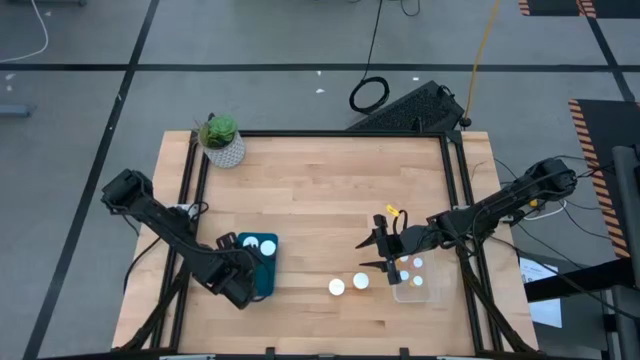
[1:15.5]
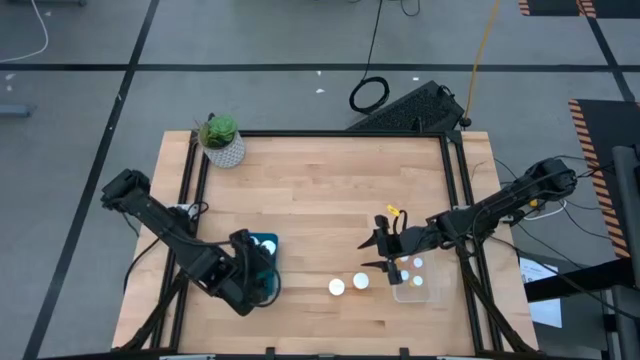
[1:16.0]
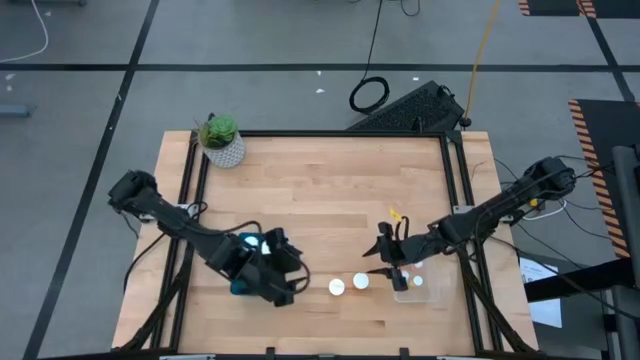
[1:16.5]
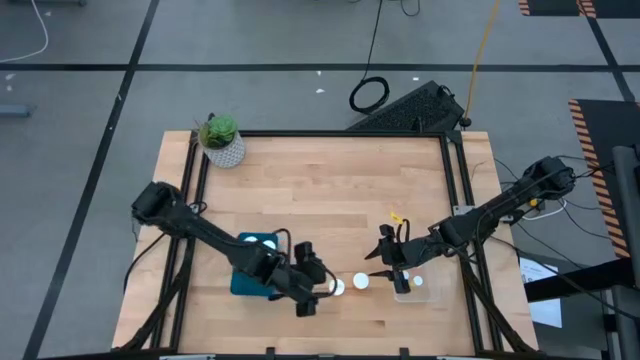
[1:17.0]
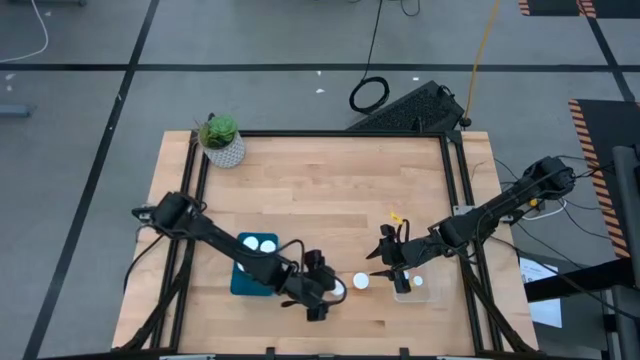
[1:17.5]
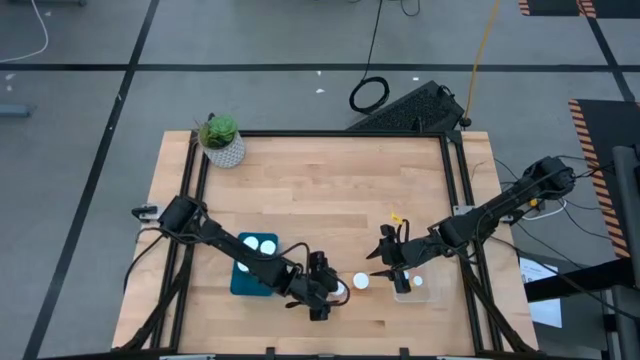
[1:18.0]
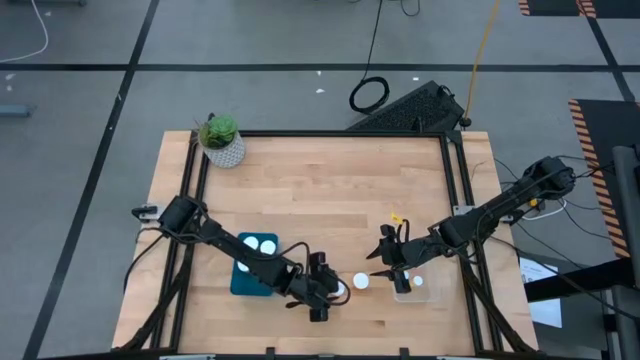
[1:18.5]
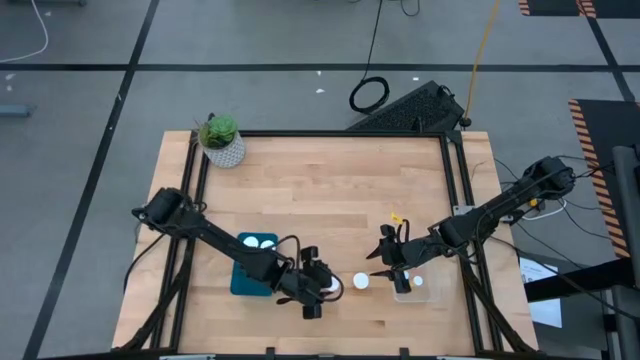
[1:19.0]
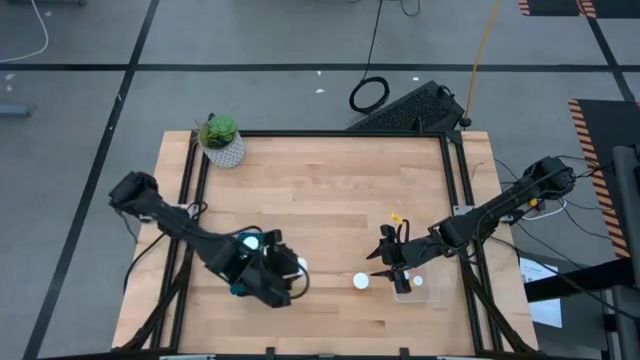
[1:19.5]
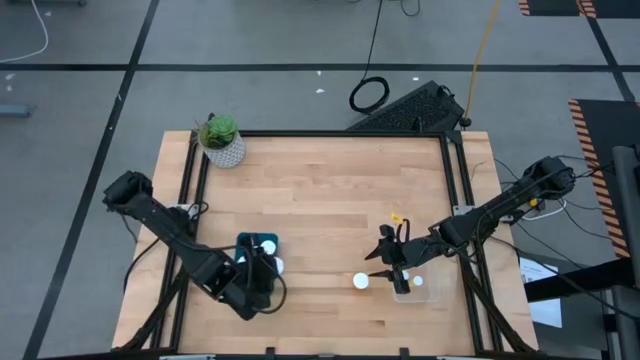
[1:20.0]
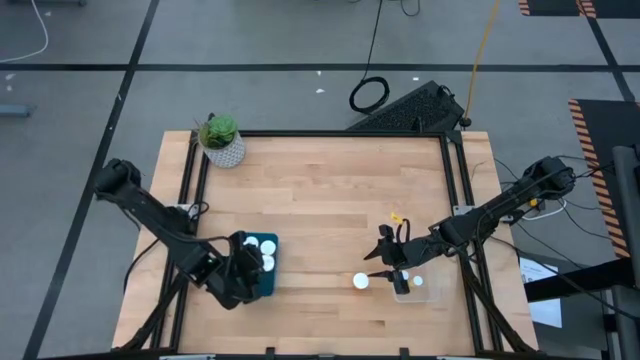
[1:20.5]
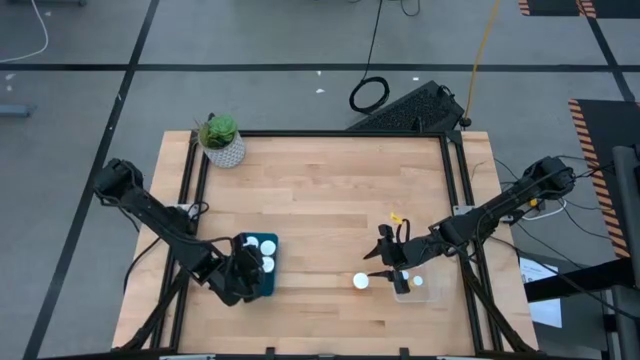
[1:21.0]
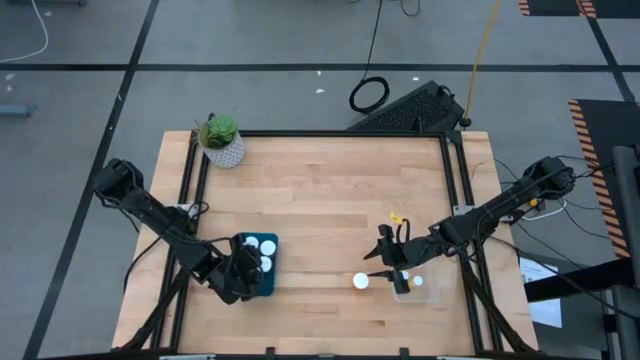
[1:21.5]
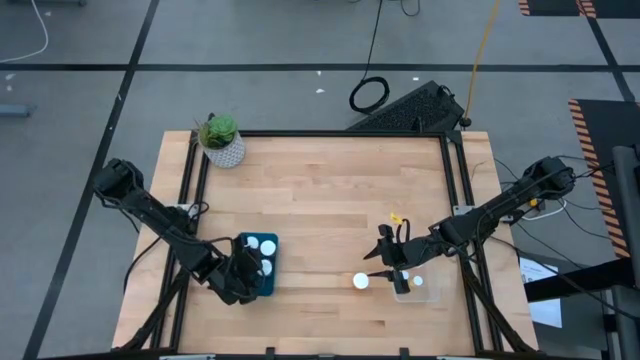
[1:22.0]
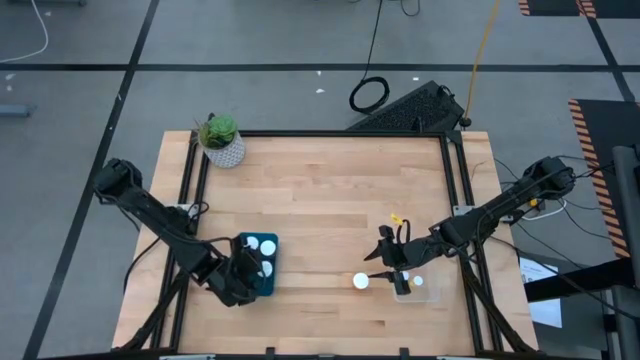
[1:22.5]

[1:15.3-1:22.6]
Task: Pick and place medicine bottles into bin by pill shape (circle, oval)
Put the orange bottled capsule into the blue bin

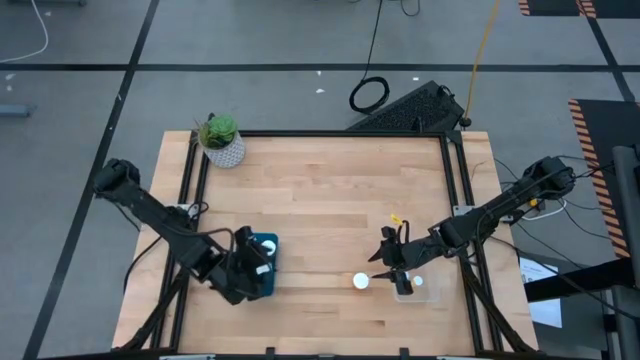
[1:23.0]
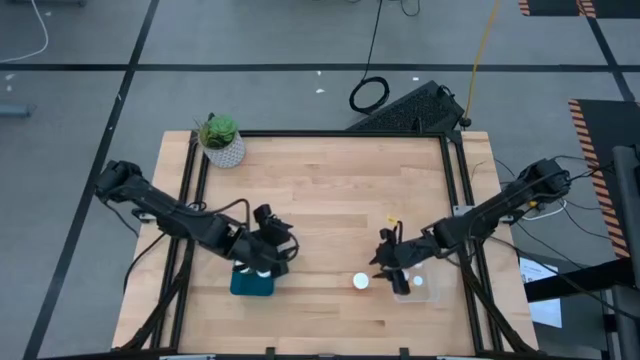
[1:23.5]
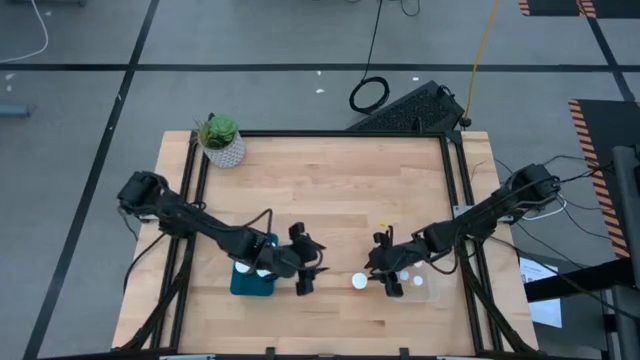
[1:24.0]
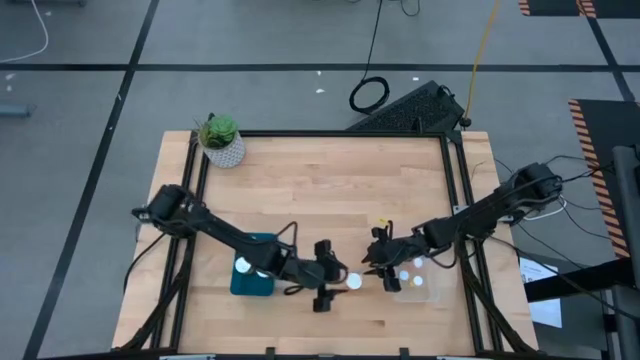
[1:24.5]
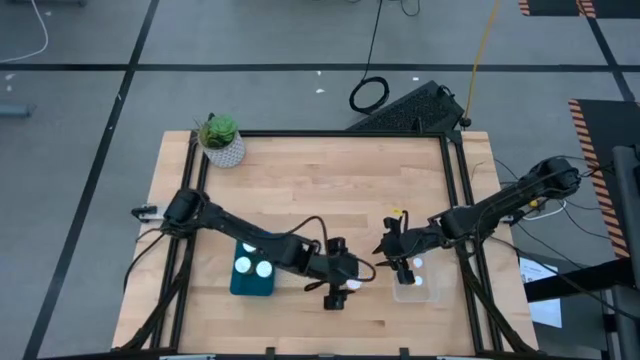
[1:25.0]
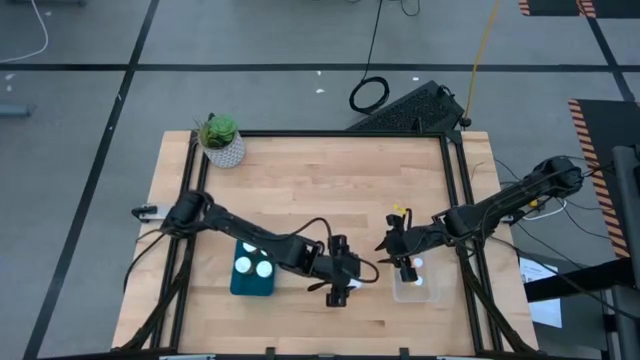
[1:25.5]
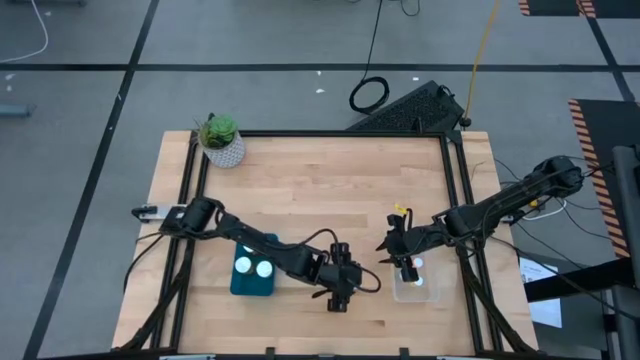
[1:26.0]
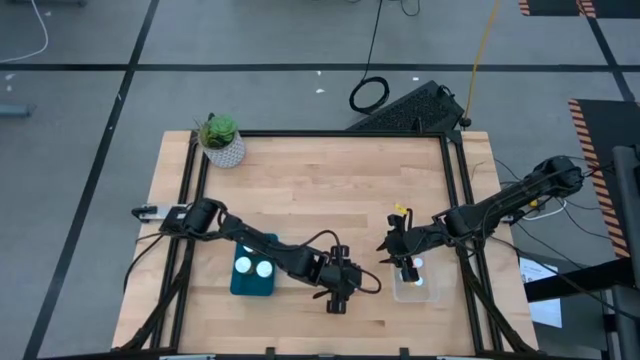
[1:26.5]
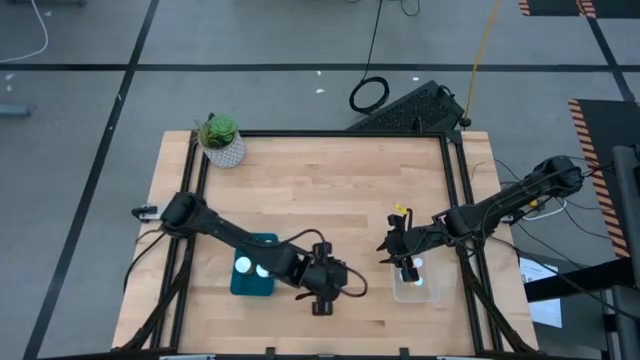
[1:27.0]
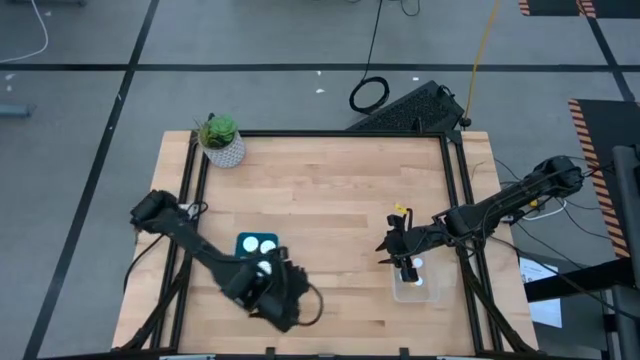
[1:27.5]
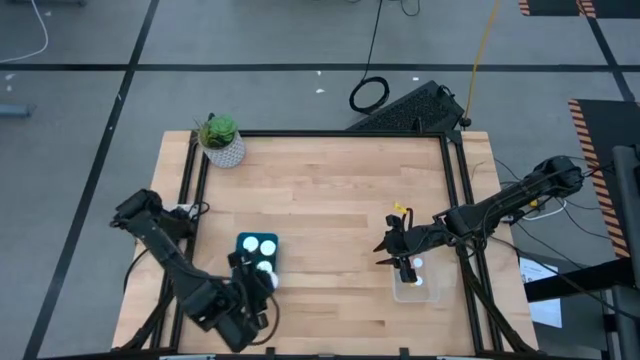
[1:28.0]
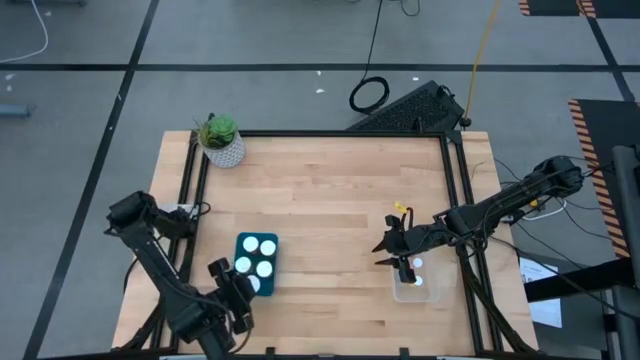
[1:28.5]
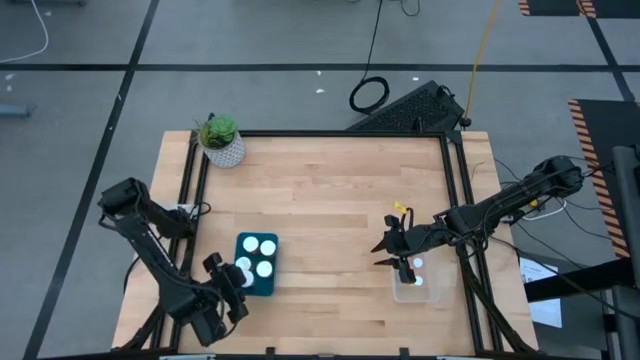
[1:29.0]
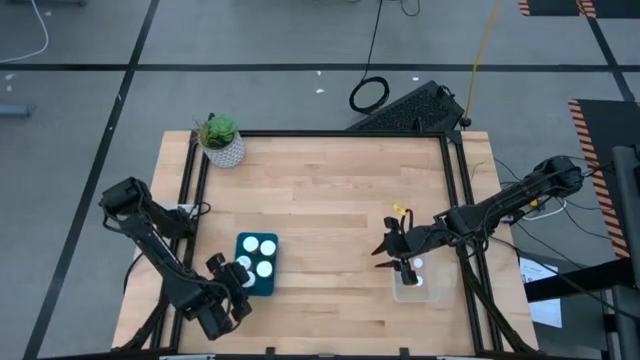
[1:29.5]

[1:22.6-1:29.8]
Put the orange bottled capsule into the blue bin

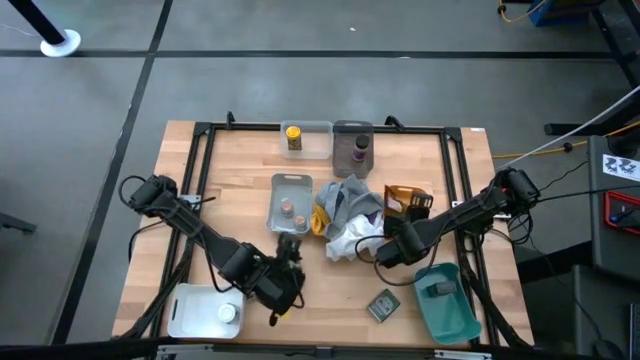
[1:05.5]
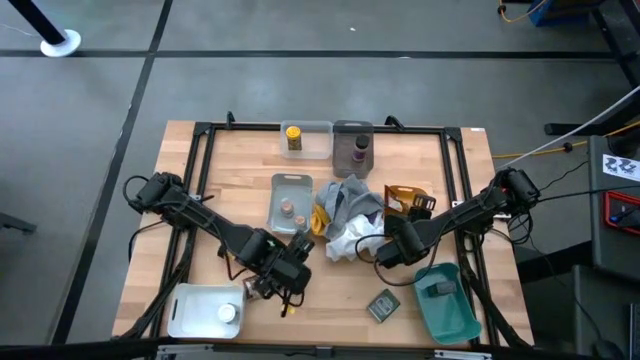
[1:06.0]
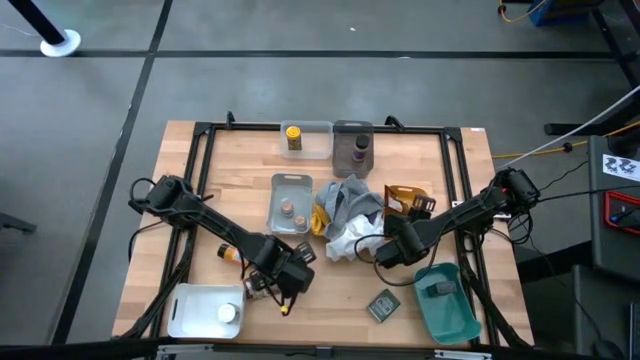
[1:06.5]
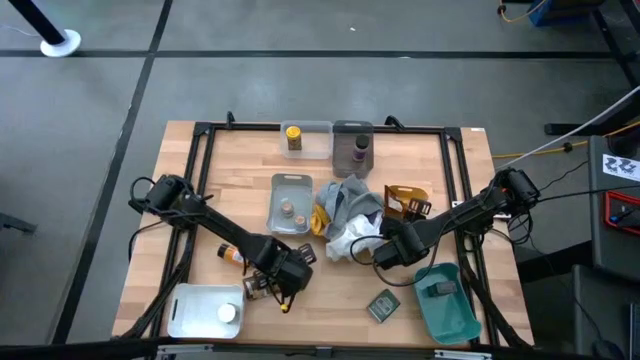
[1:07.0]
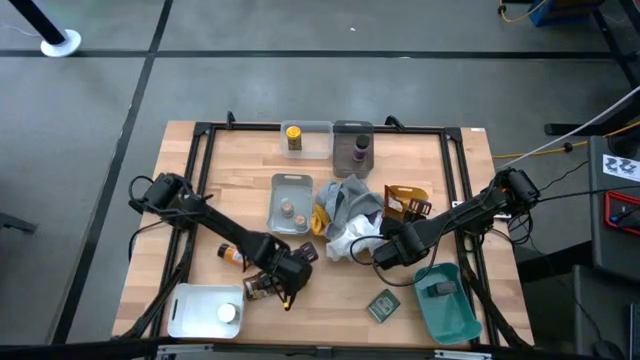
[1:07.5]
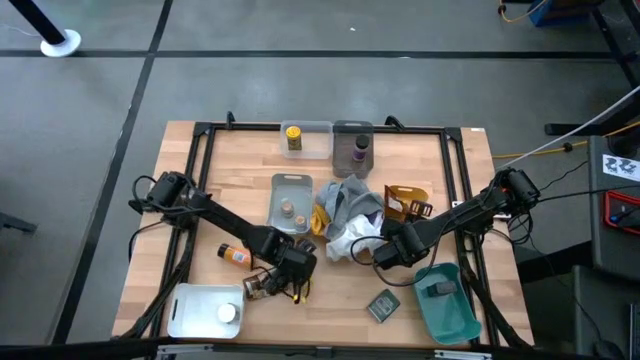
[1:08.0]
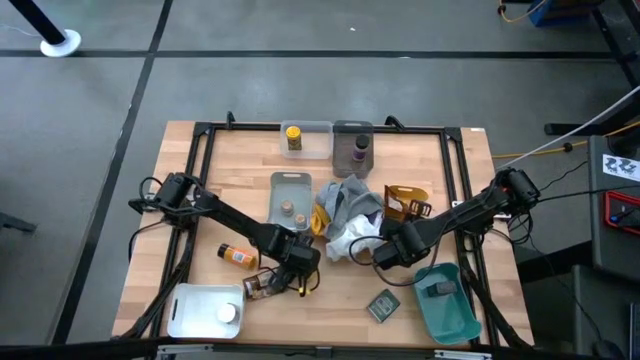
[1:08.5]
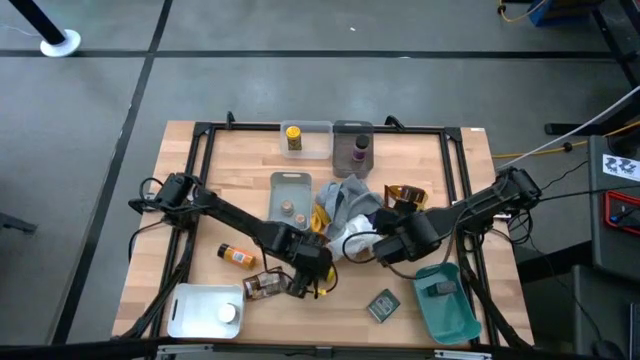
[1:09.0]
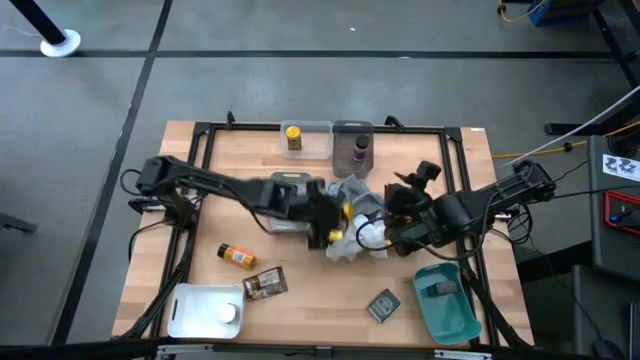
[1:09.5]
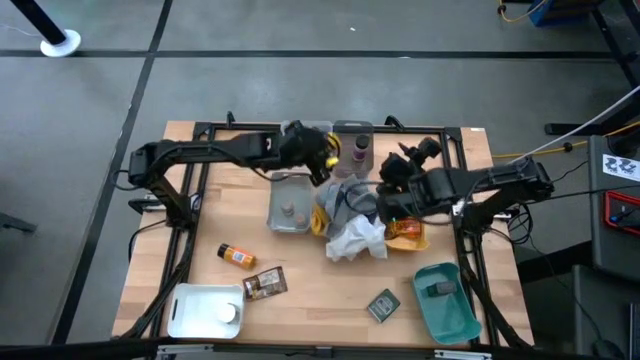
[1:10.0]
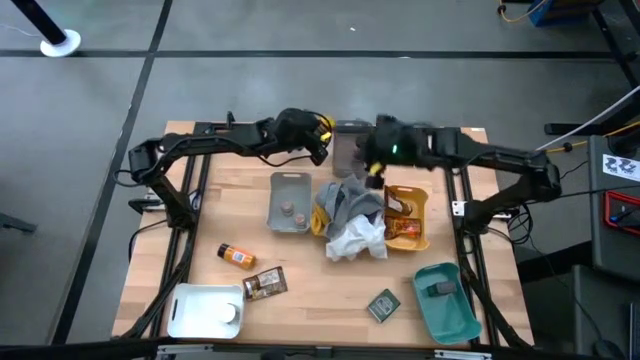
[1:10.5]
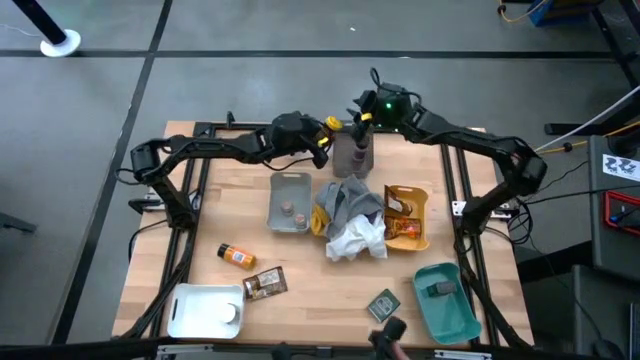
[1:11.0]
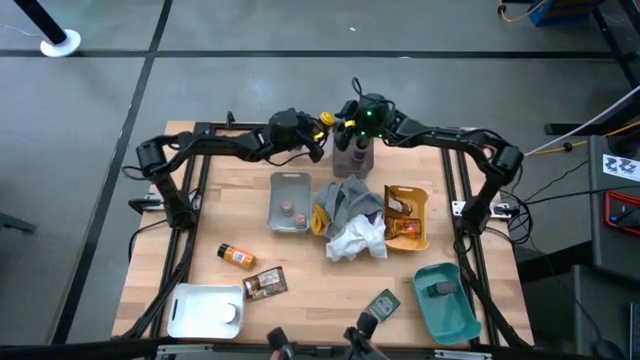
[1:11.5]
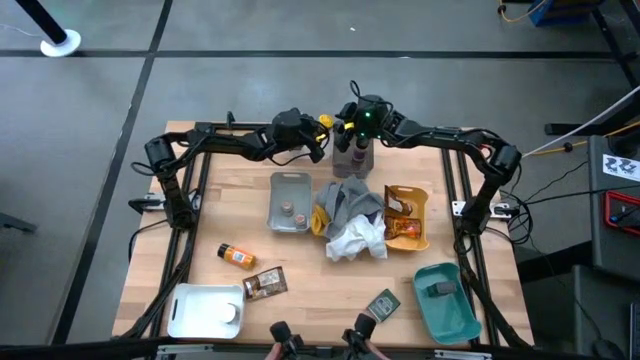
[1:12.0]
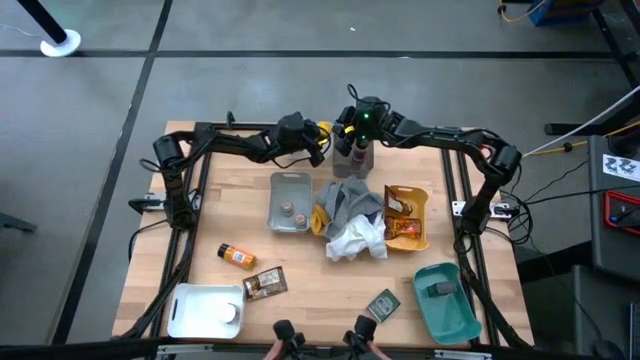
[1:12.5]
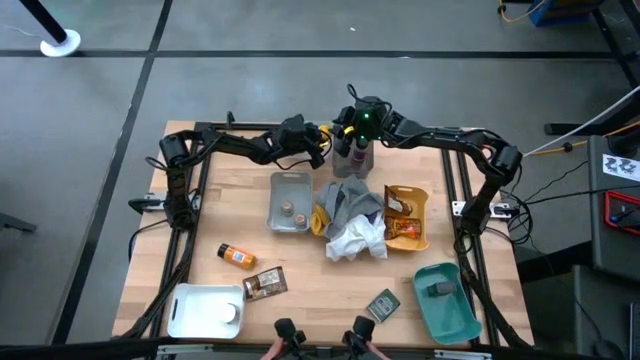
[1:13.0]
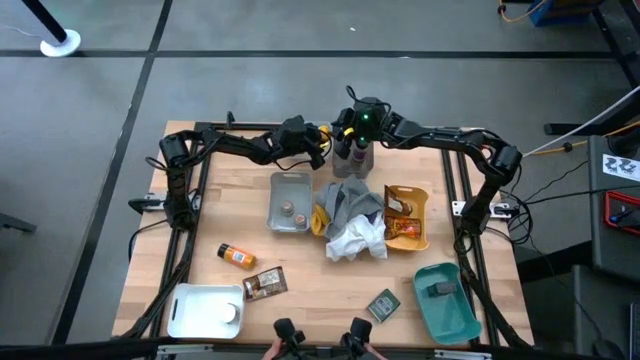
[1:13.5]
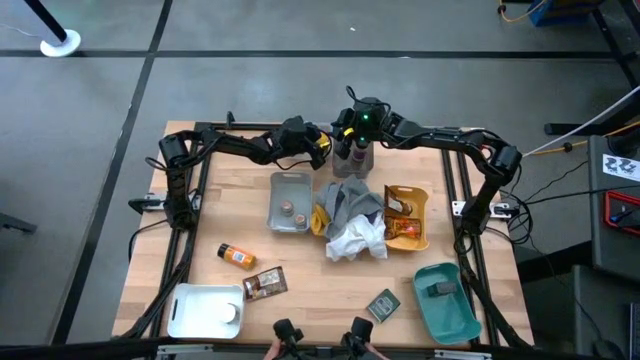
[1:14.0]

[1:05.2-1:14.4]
Task: Sort spices by type
Put the yellow seasoning bottle into the transparent bin
